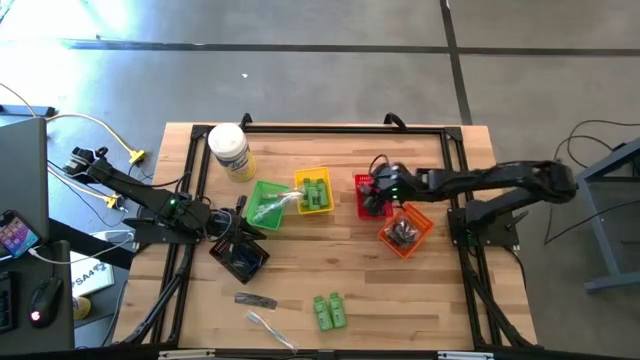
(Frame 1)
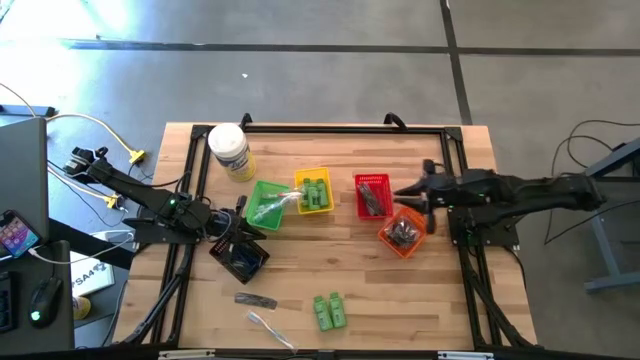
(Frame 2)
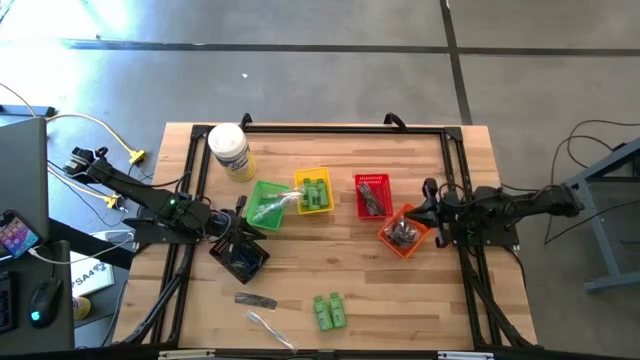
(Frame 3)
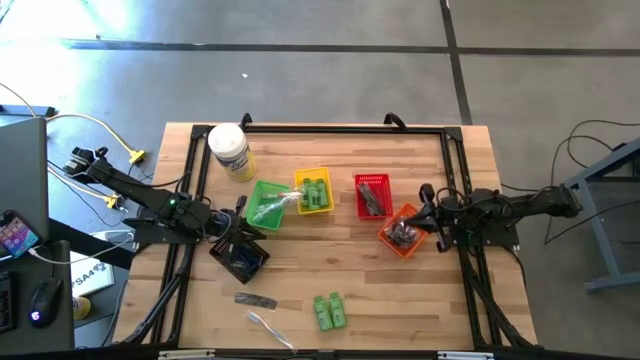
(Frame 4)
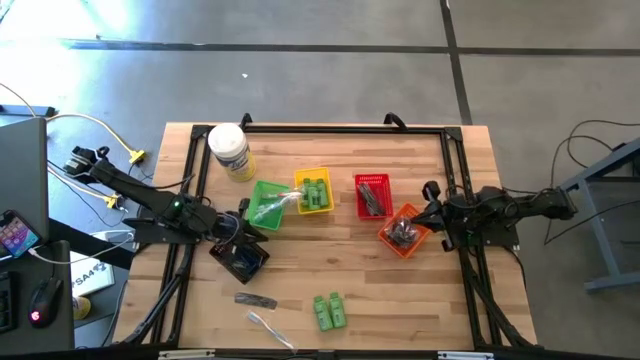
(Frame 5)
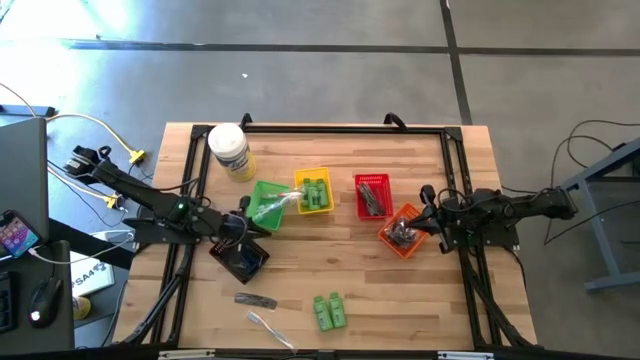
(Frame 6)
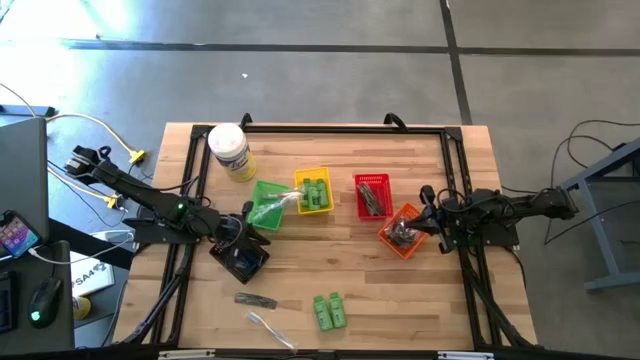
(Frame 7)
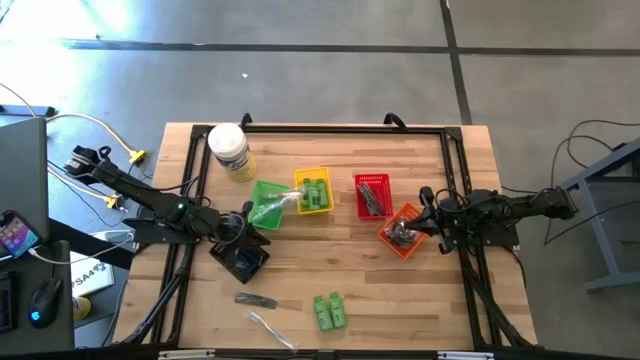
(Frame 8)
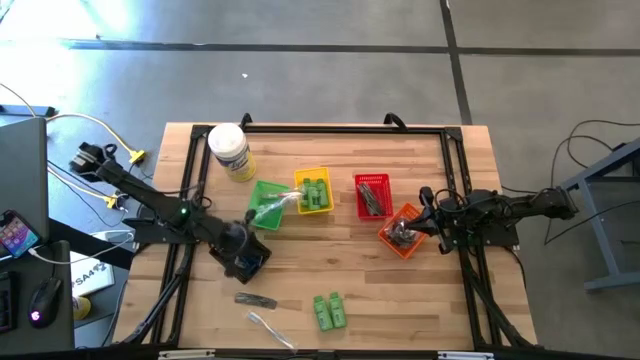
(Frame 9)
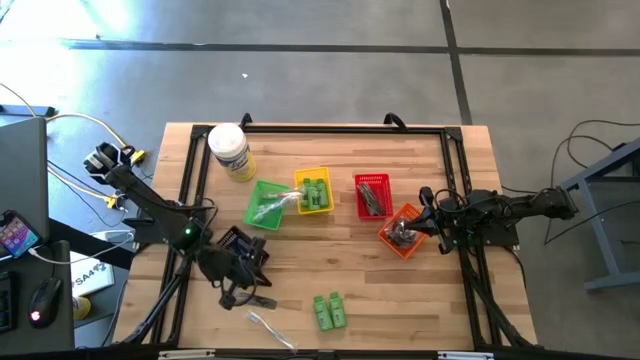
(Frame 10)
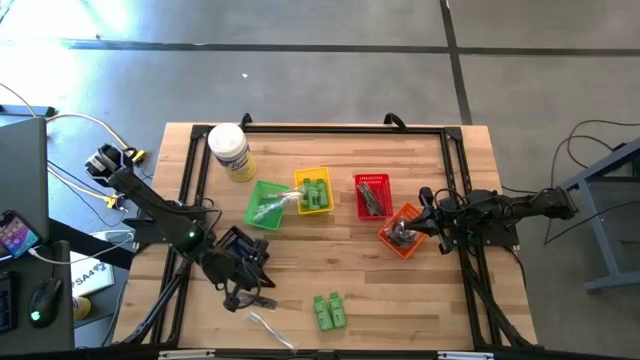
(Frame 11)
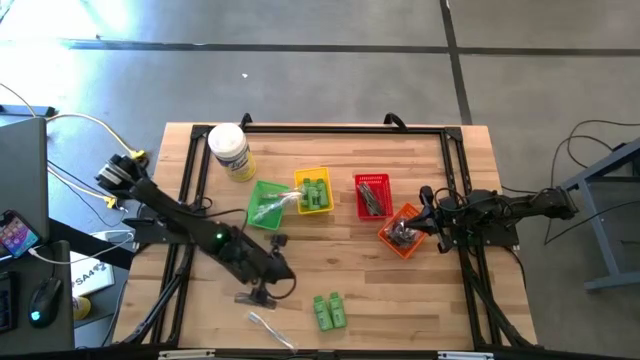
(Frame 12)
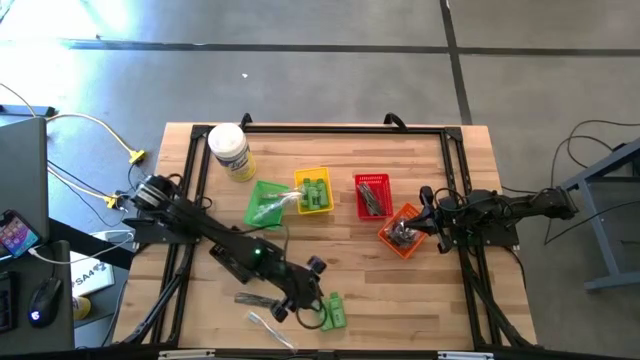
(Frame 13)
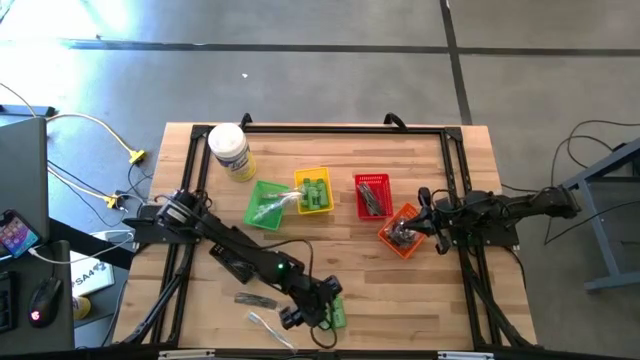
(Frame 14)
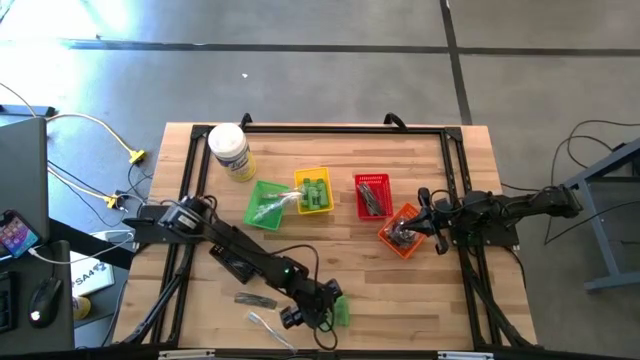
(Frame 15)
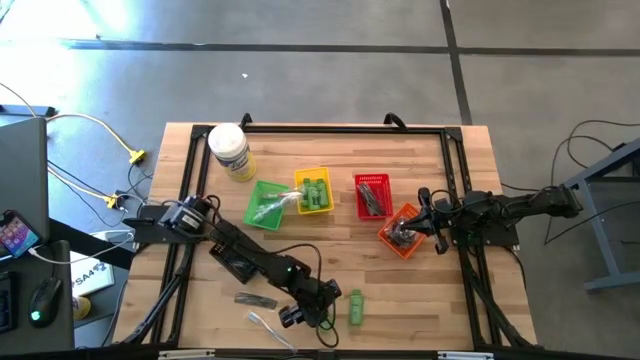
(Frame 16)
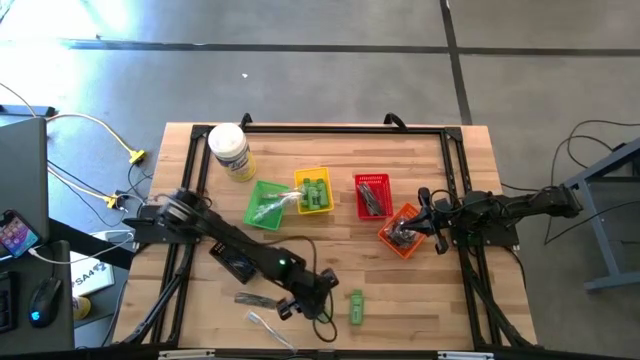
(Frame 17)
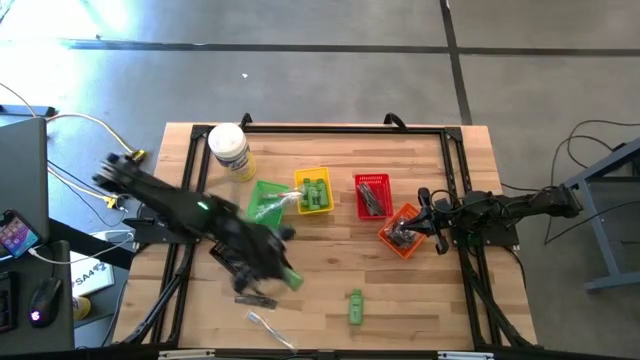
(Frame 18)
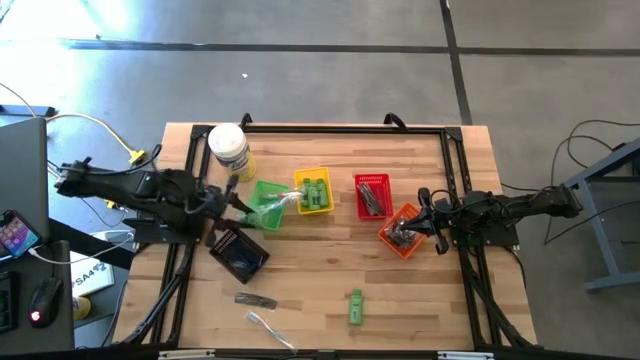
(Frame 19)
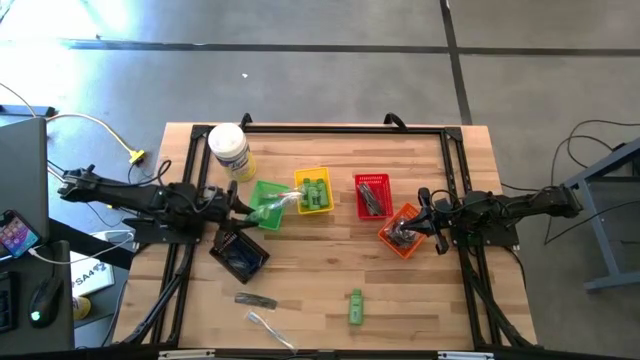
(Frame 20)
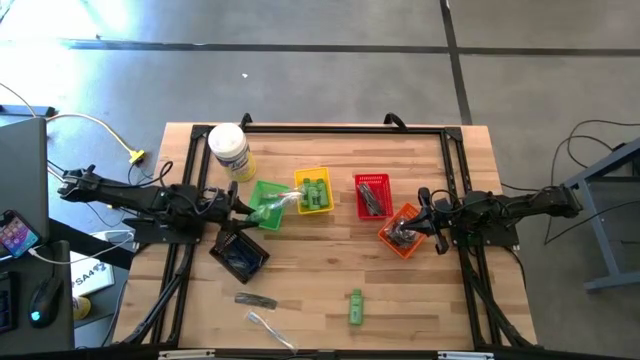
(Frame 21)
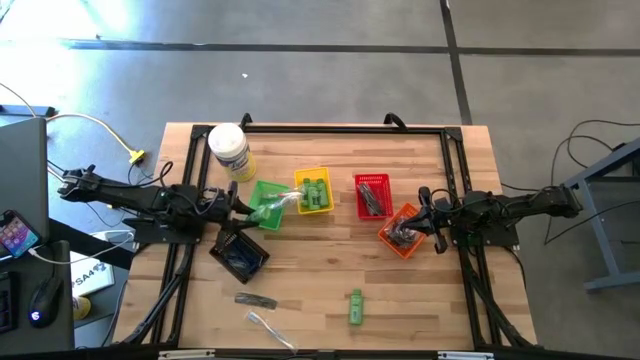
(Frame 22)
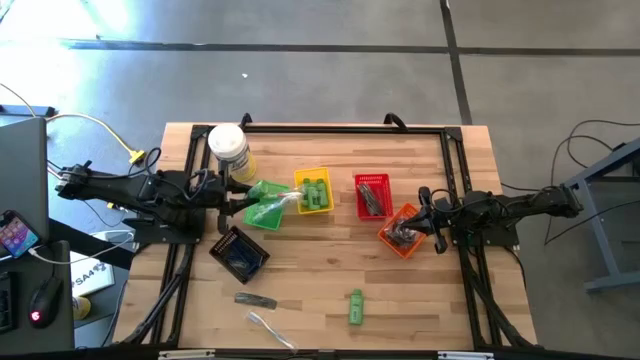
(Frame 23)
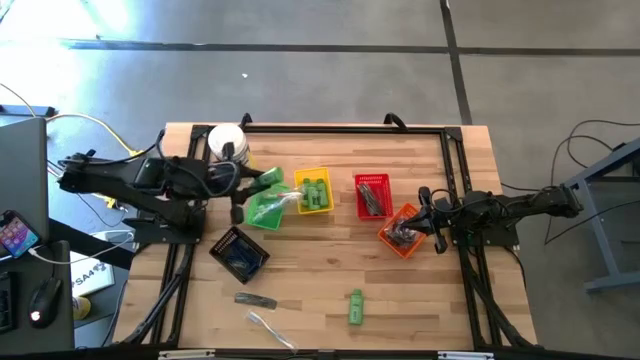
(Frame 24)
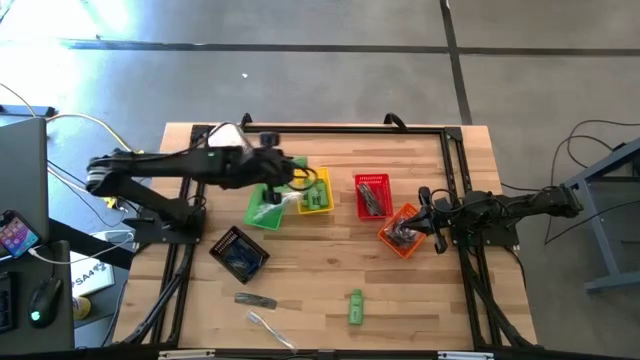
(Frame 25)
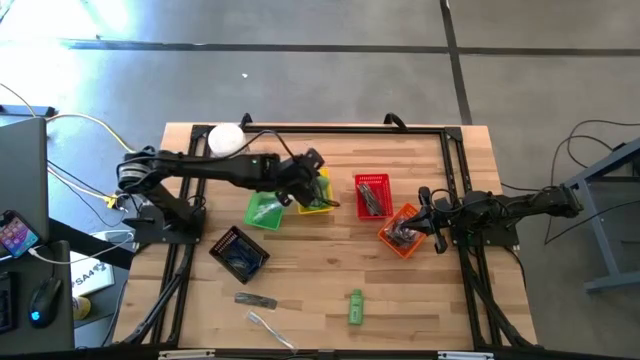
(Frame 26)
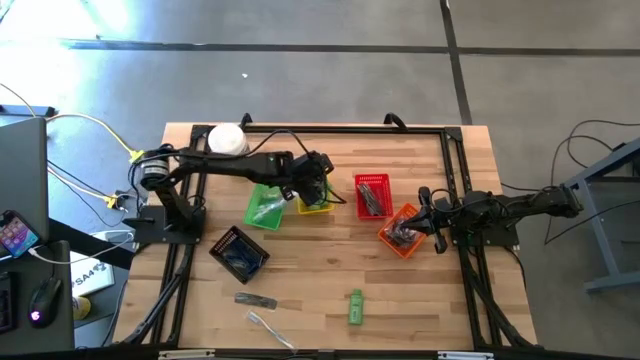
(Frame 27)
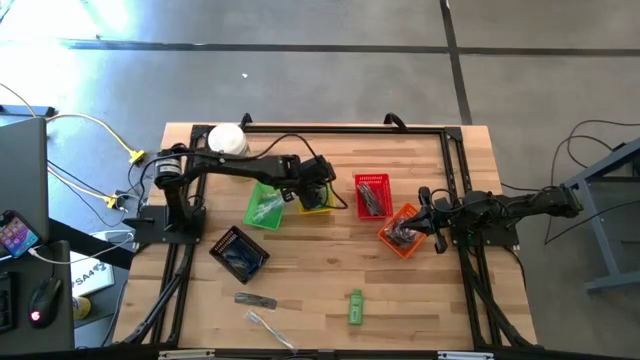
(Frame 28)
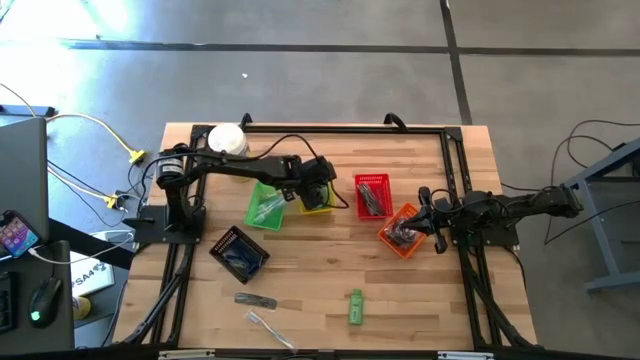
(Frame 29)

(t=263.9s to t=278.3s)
Task: Pick & Place Travel size toiletries
Put the left green shampoo into yellow basket

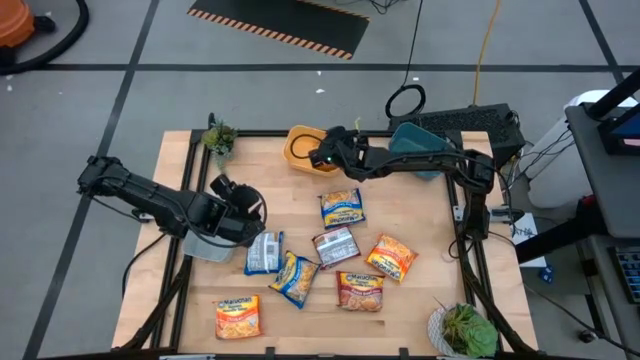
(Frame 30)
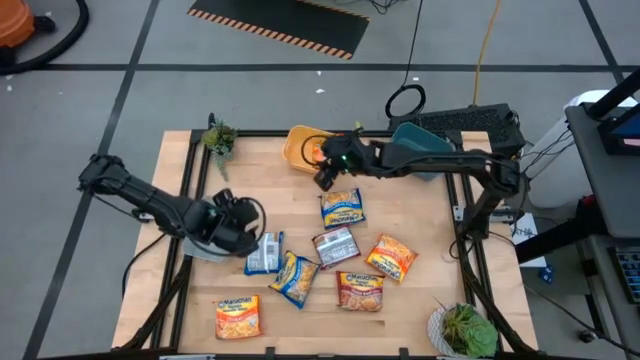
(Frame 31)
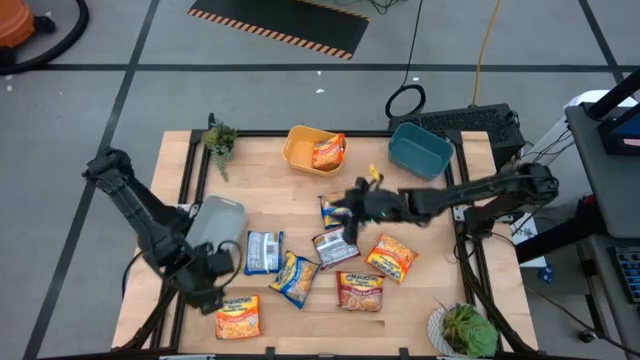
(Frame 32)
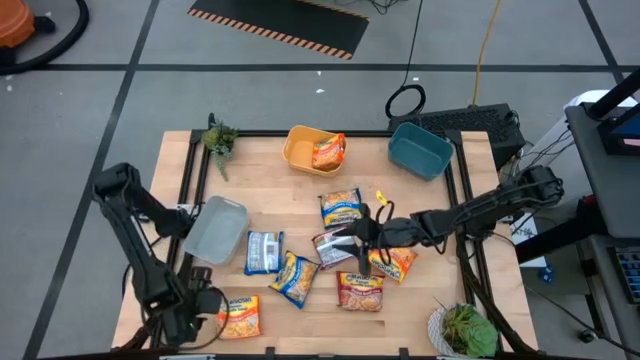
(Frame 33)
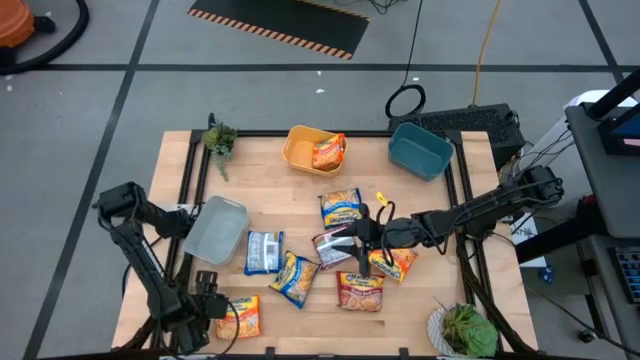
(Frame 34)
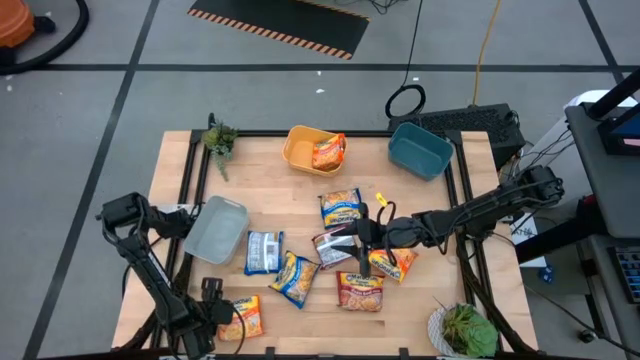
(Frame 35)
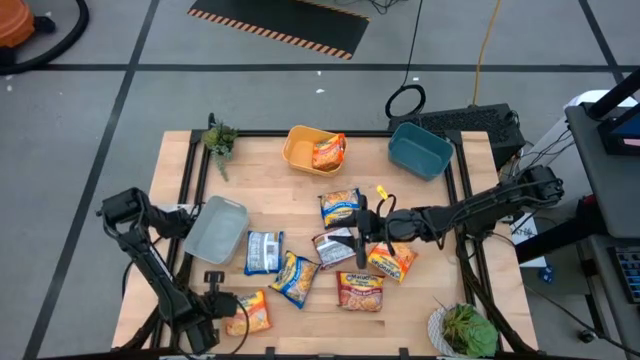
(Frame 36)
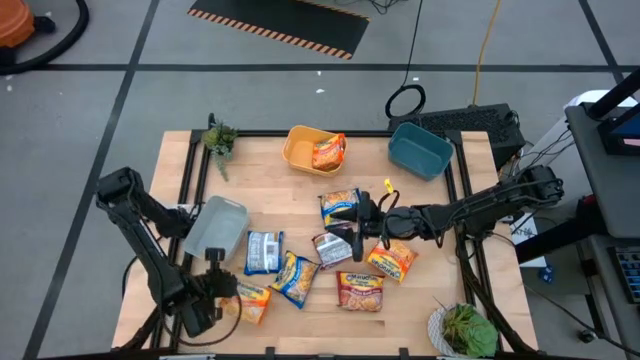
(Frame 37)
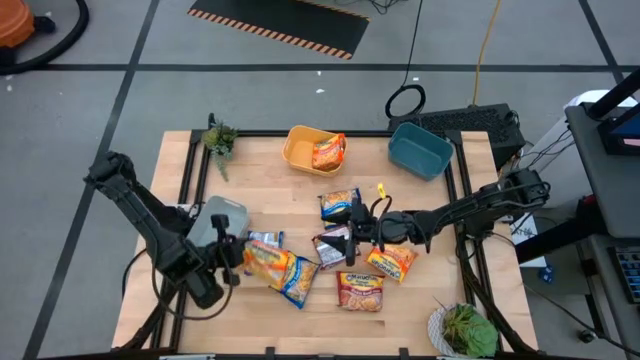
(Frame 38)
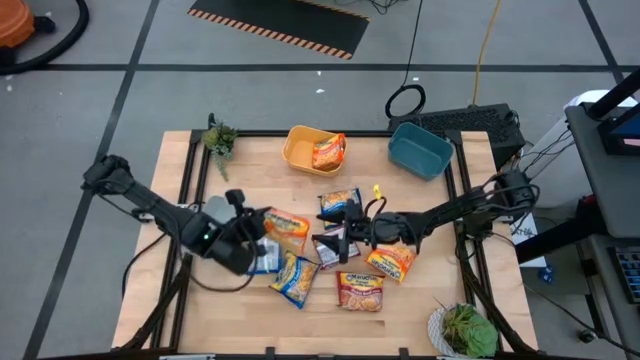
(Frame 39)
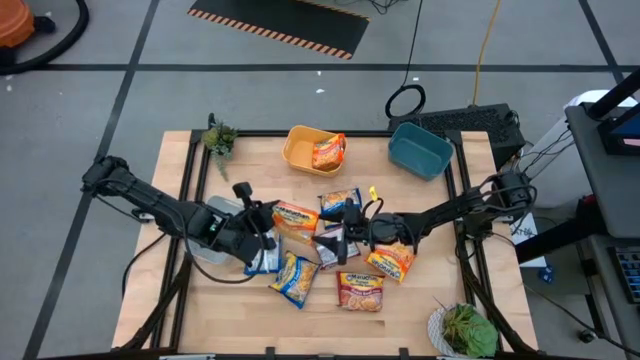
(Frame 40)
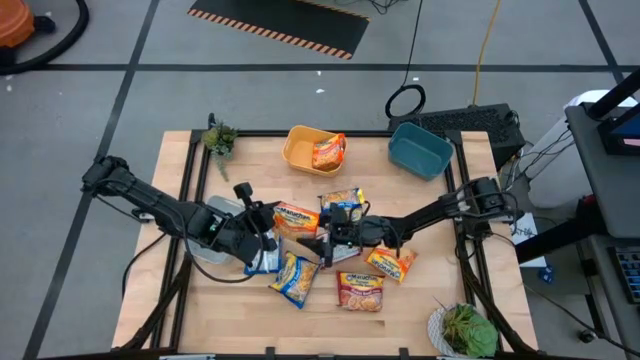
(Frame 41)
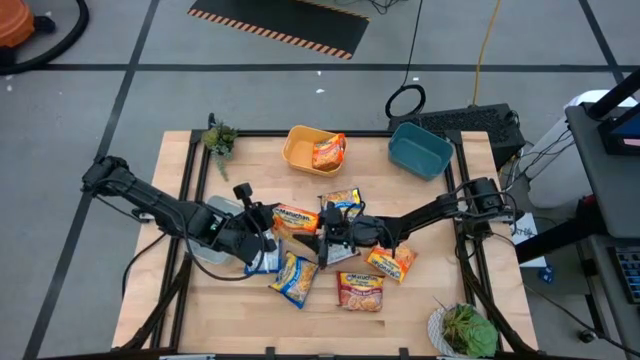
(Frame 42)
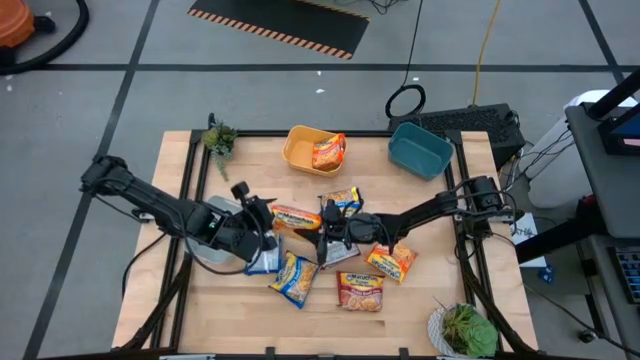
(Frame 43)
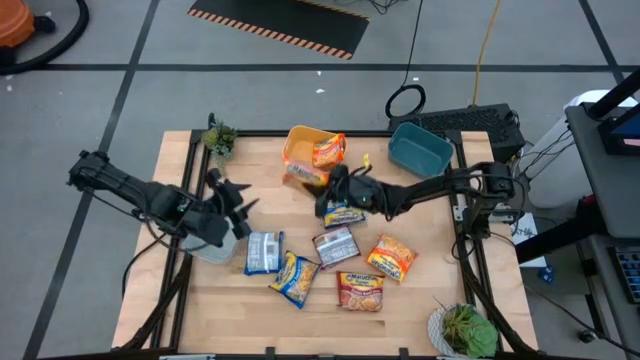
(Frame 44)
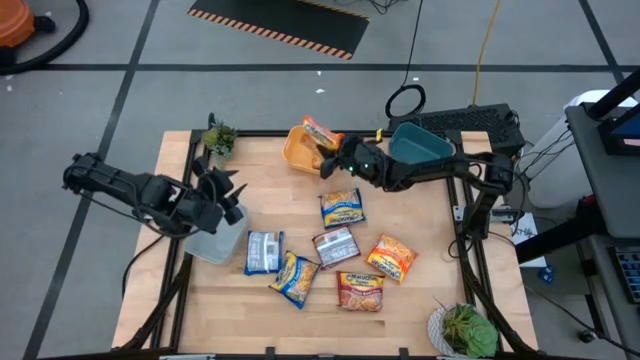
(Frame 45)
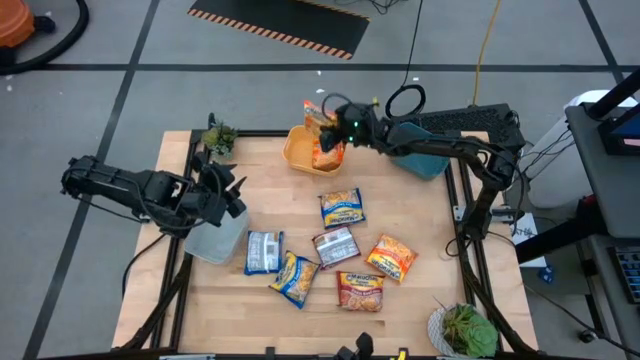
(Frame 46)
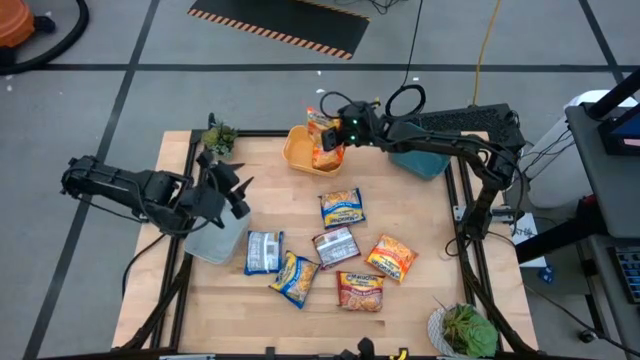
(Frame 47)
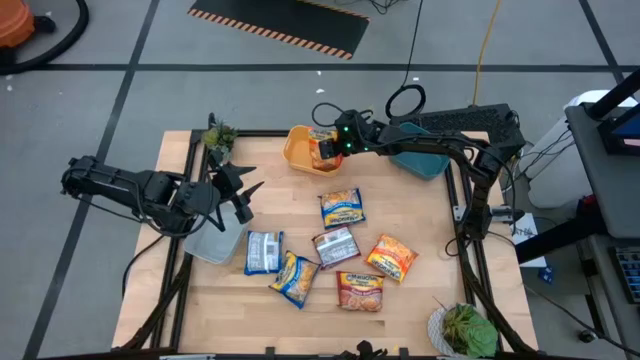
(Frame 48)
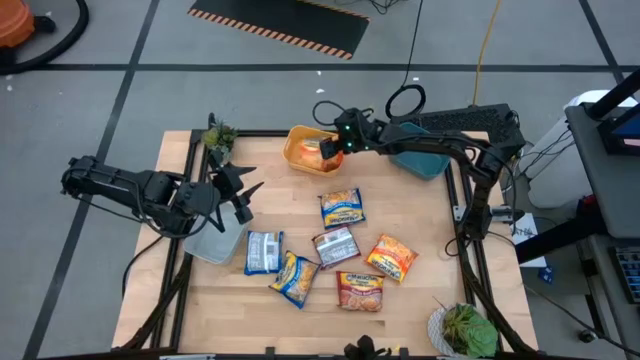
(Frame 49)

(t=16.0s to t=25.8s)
Task: Sort Maruchan noodles
Put the bottom orange bag into the yellow bin
